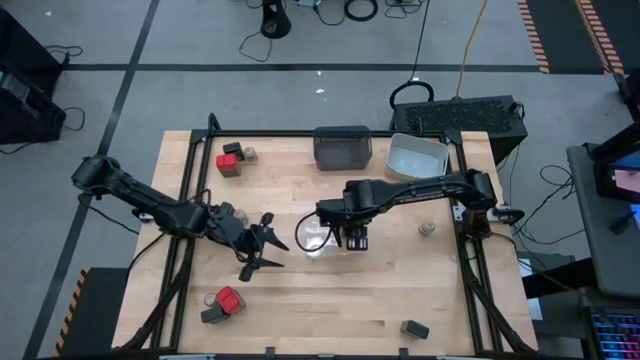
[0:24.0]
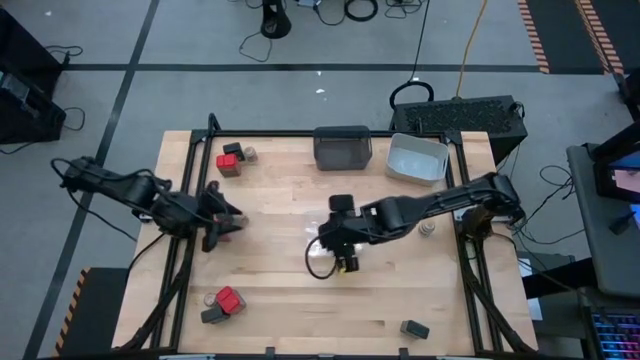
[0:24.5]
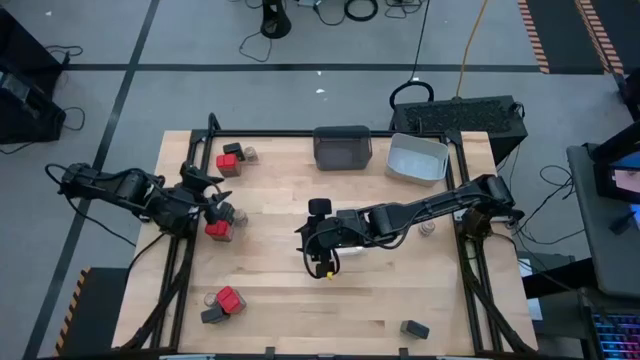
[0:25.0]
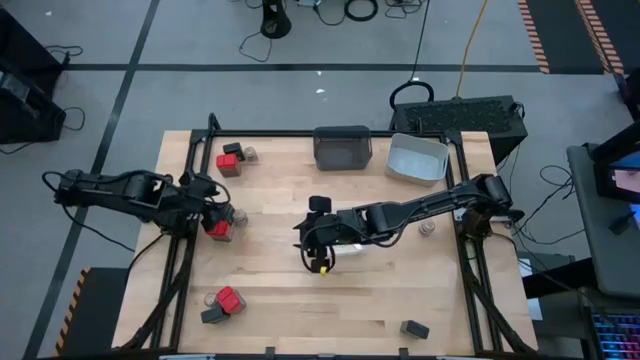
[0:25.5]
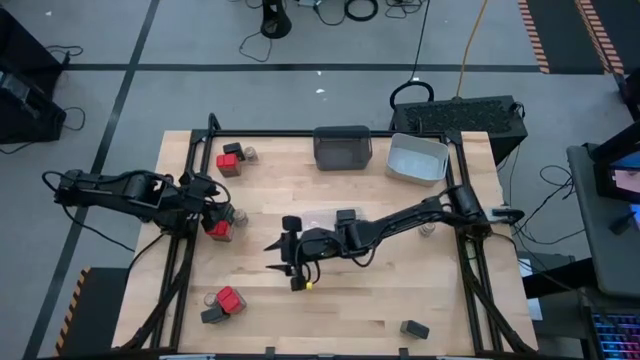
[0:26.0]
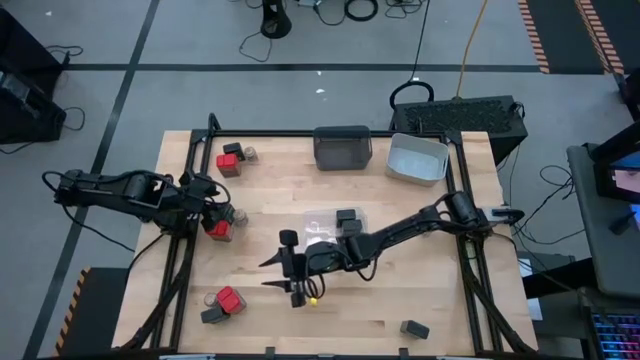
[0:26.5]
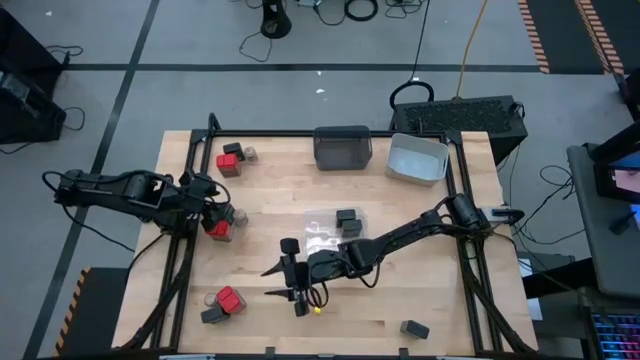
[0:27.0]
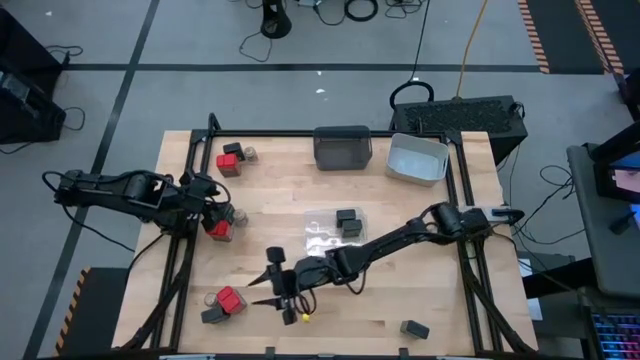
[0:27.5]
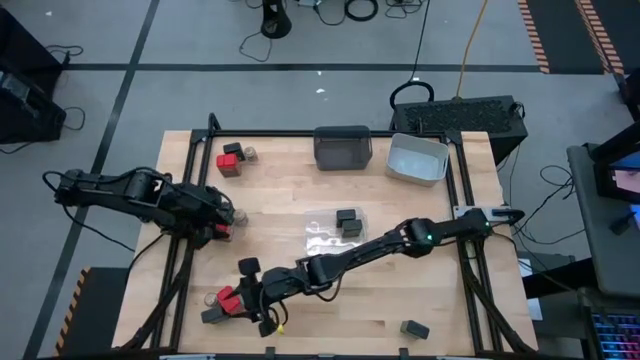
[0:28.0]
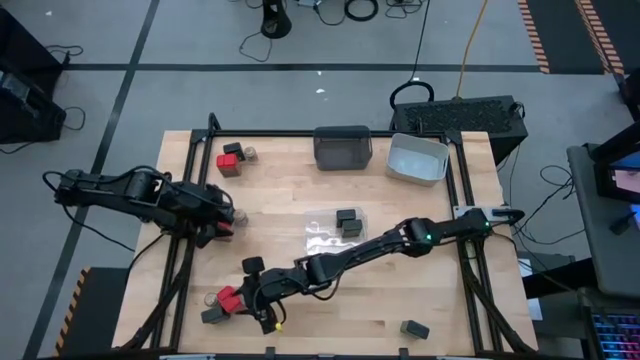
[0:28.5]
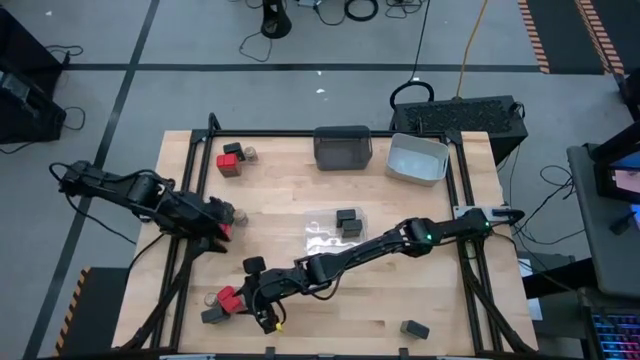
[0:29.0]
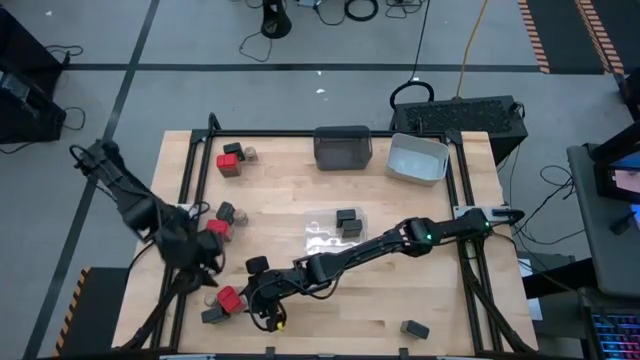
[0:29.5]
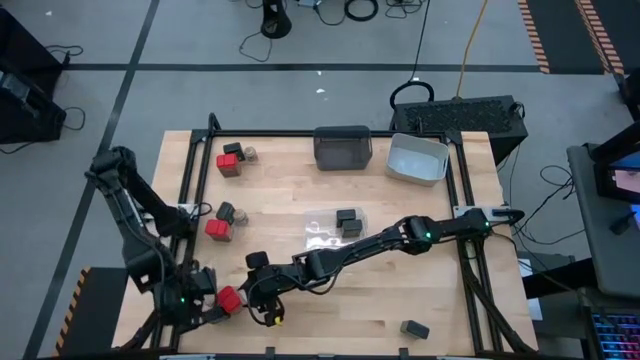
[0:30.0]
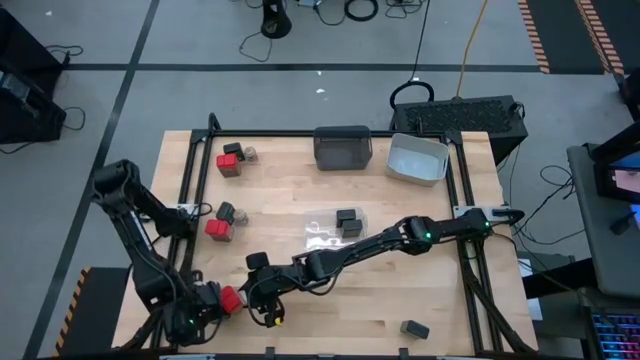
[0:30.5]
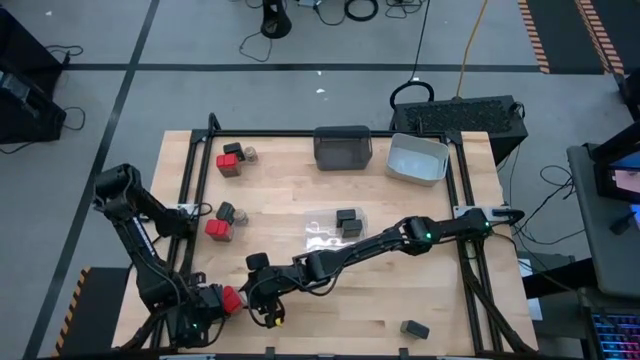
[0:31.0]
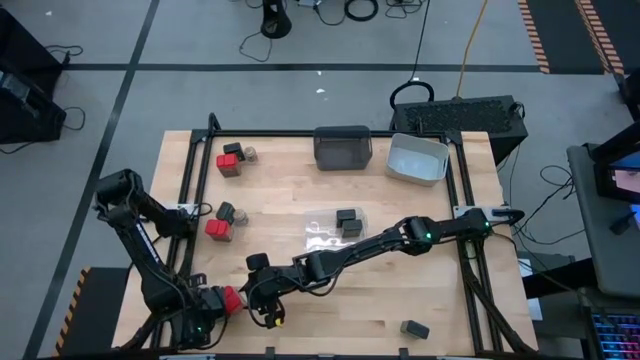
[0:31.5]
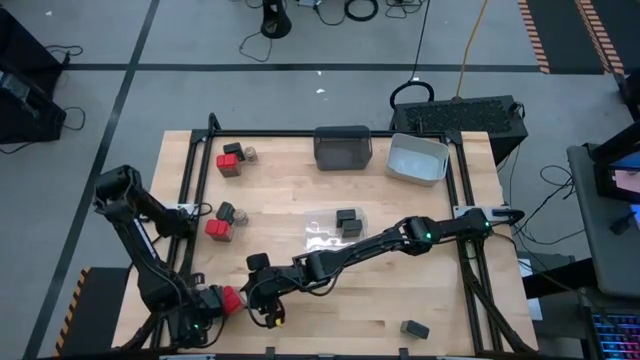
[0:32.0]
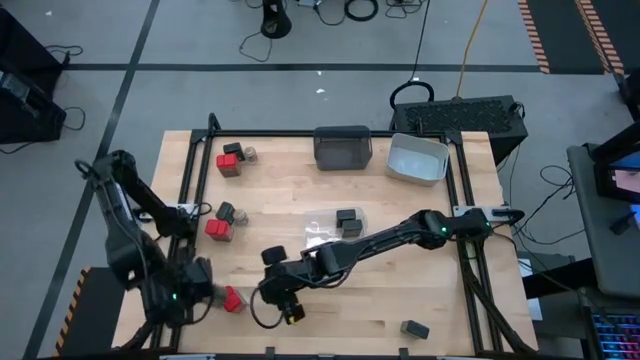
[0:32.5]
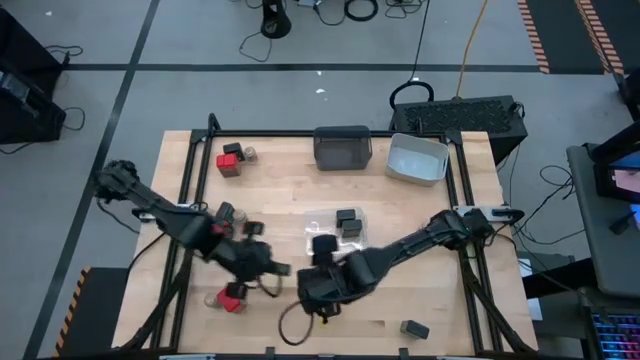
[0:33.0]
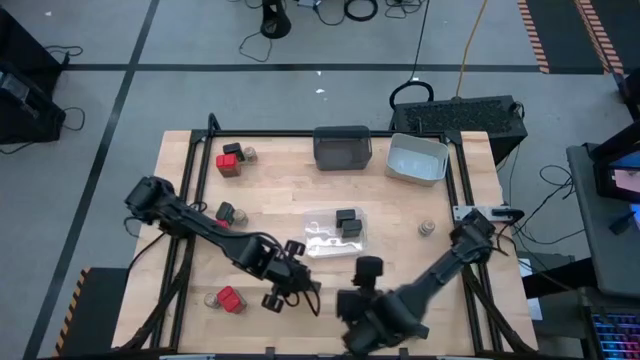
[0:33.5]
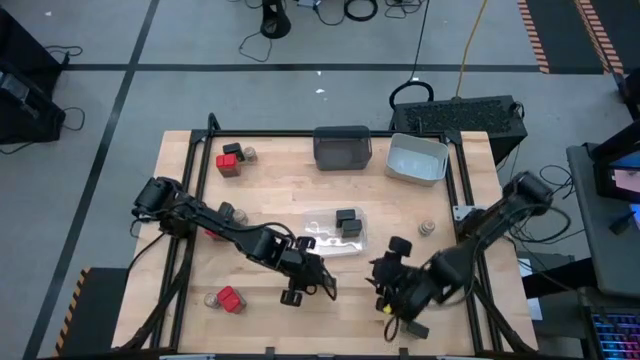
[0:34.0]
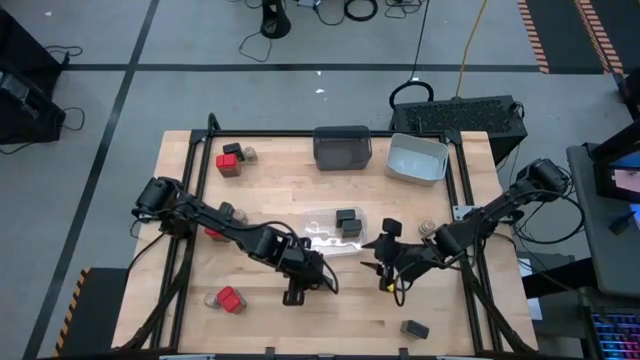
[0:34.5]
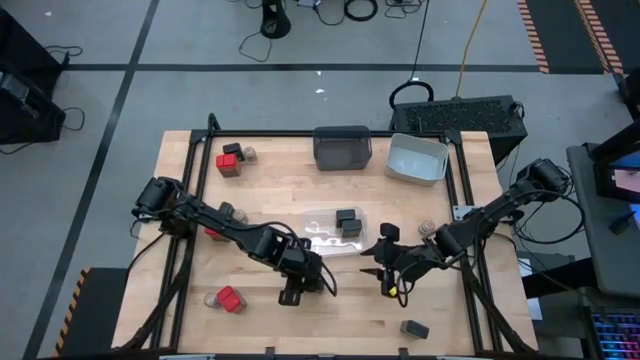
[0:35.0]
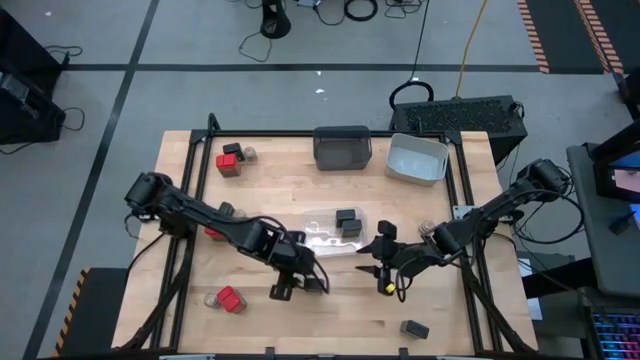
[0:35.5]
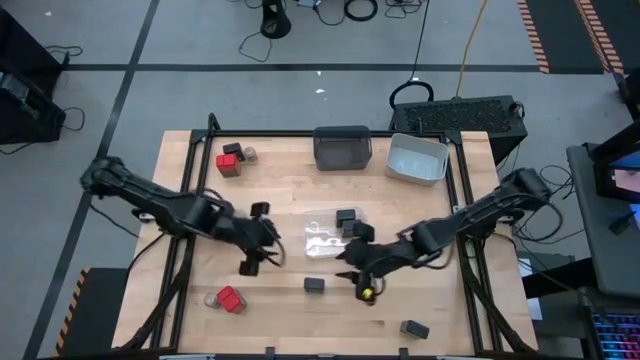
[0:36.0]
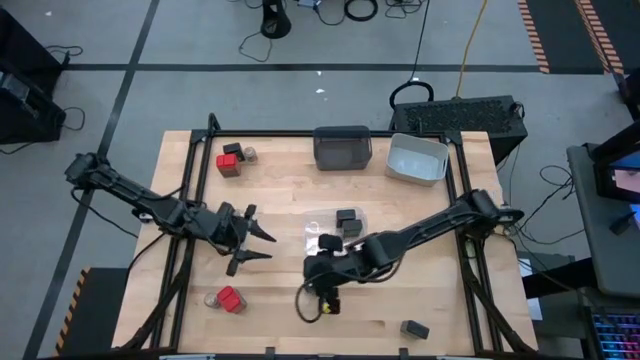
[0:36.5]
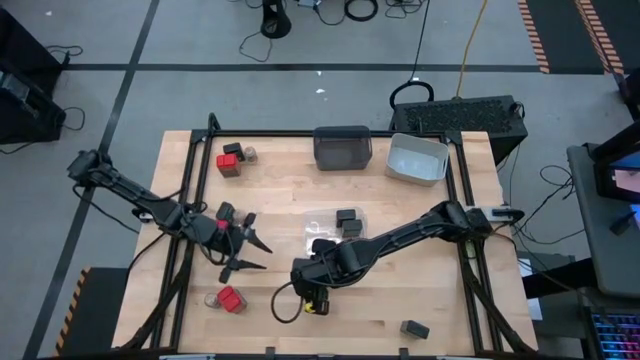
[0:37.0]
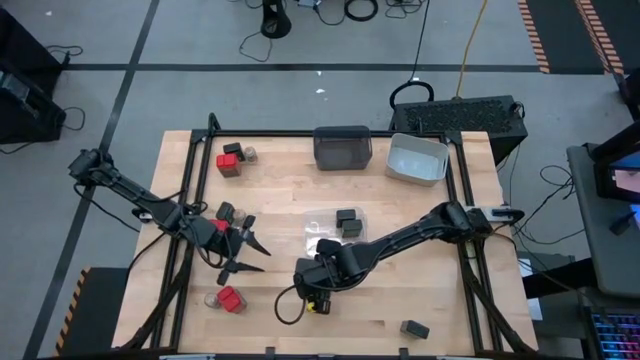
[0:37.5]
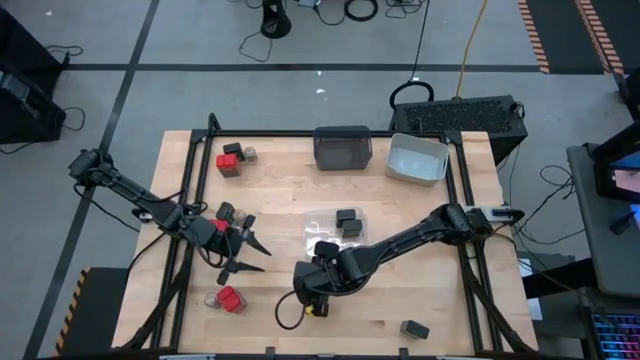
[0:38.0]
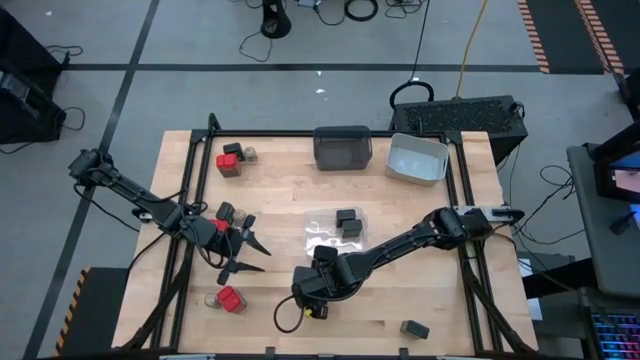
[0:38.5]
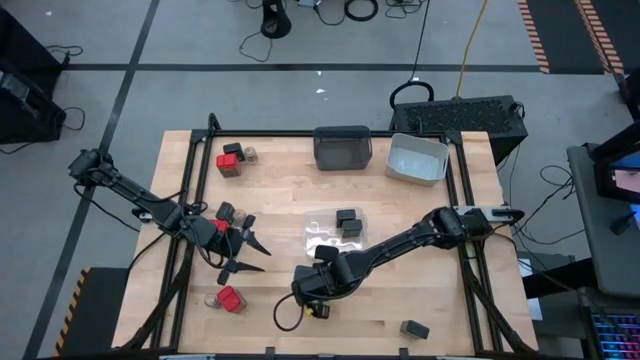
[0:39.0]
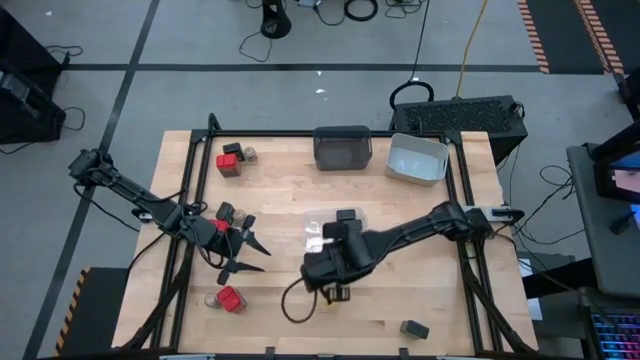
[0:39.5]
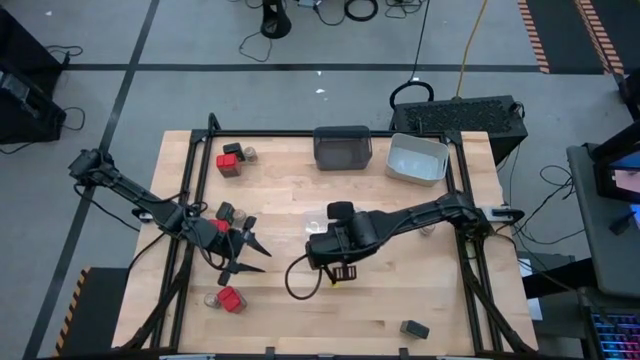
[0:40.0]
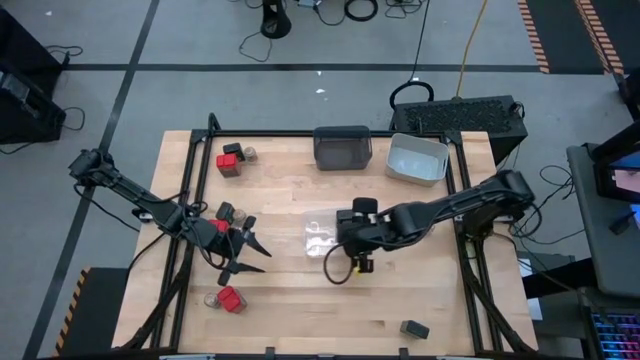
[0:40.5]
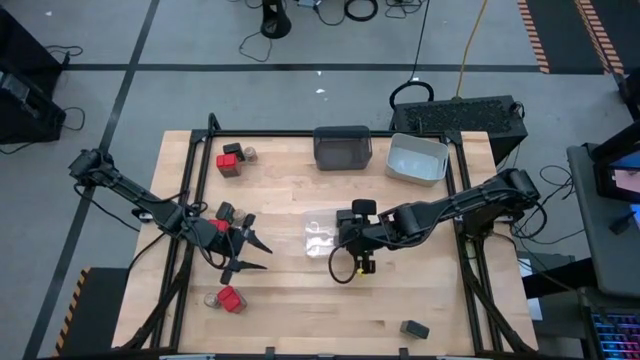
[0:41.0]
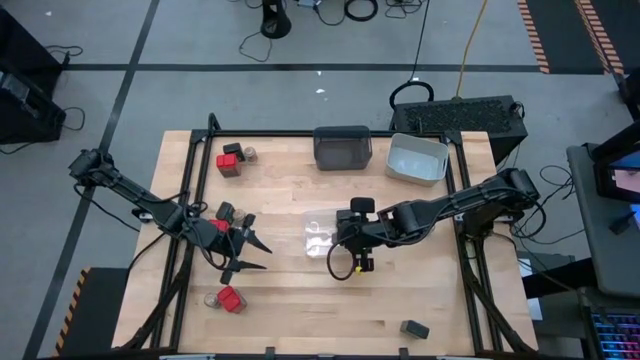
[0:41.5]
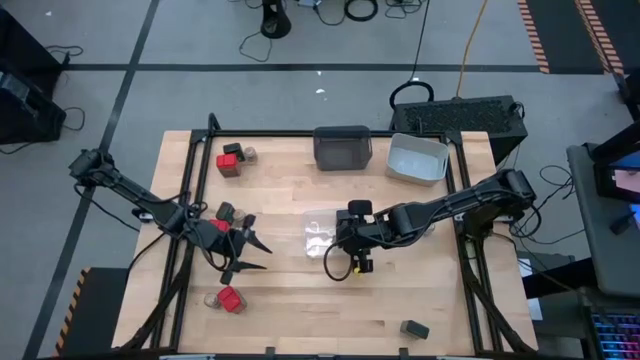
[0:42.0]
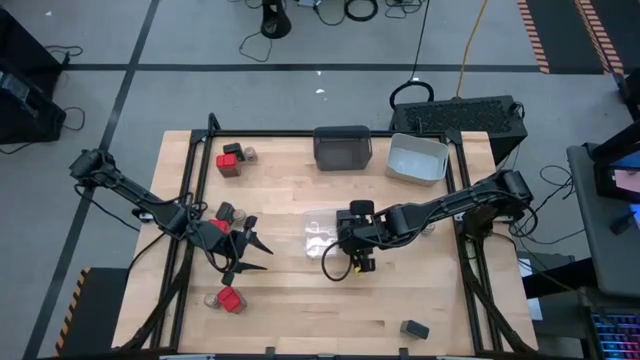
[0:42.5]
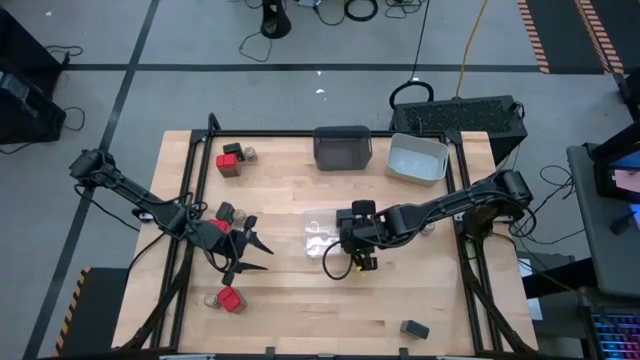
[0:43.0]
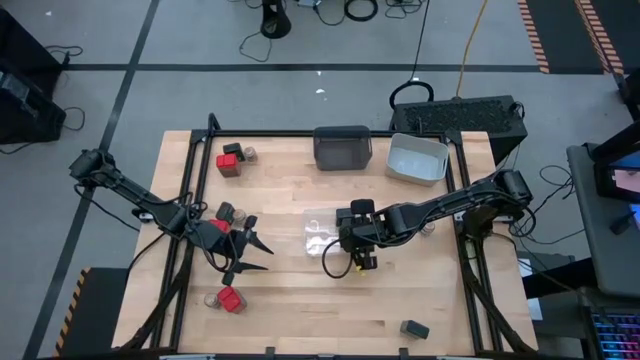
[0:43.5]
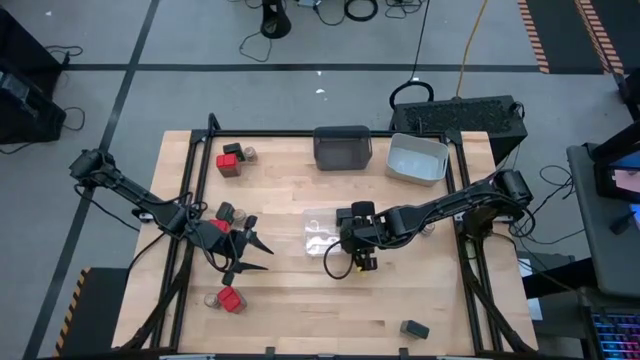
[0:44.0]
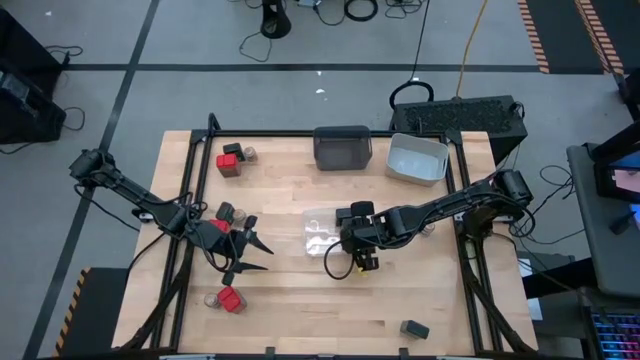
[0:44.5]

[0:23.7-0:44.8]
Task: Sort spices by type
Put the black seasoning can into the transparent bin

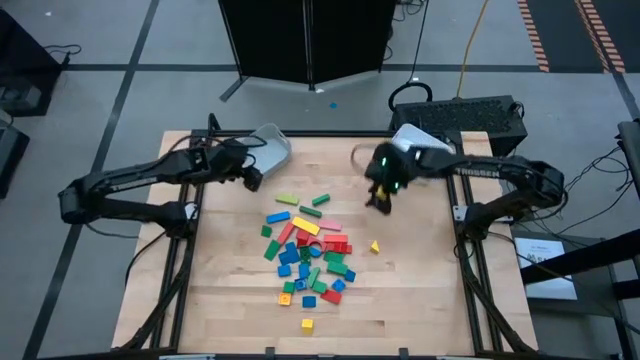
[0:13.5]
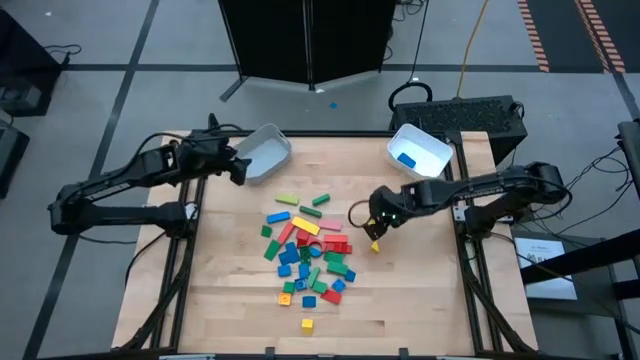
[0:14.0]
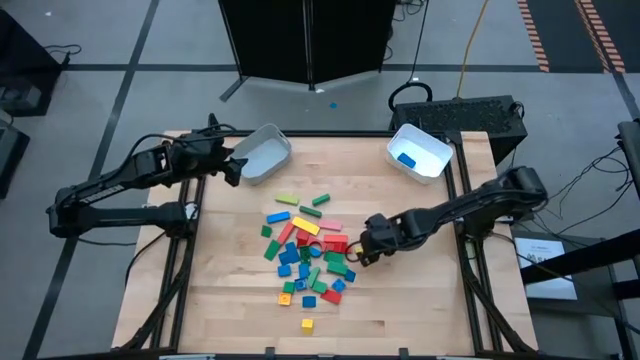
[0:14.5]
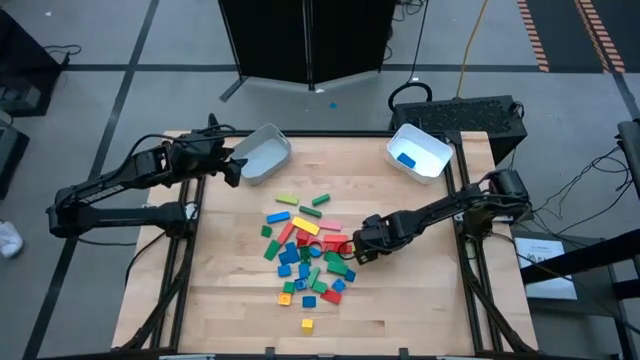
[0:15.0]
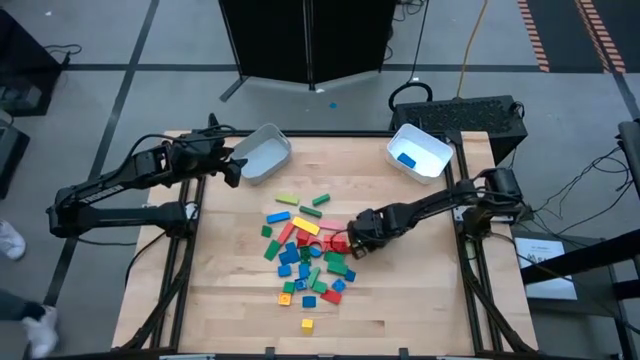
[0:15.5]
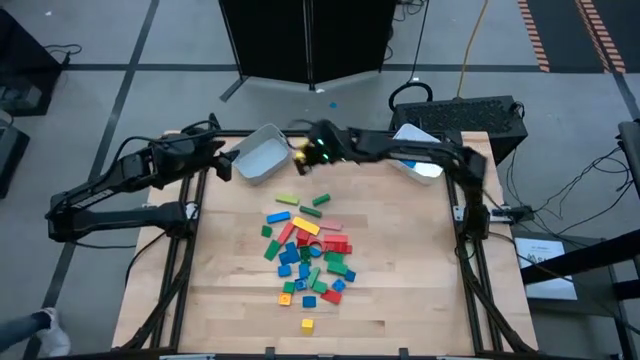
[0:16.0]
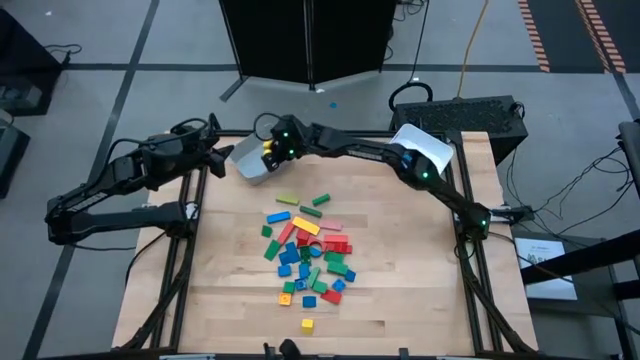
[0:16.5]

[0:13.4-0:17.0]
Task: Sort blocks by size
Put the triangular yellow block into the gray bin
